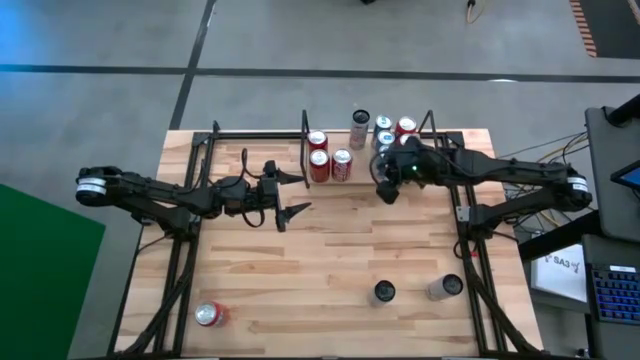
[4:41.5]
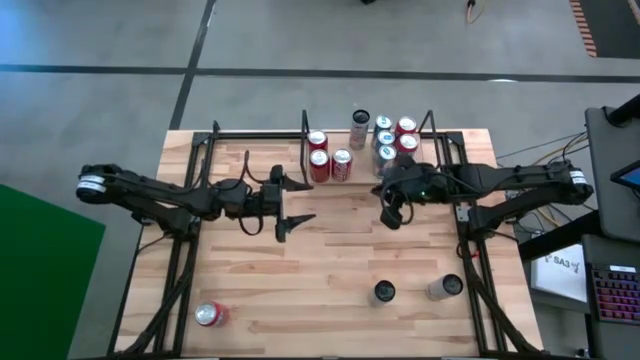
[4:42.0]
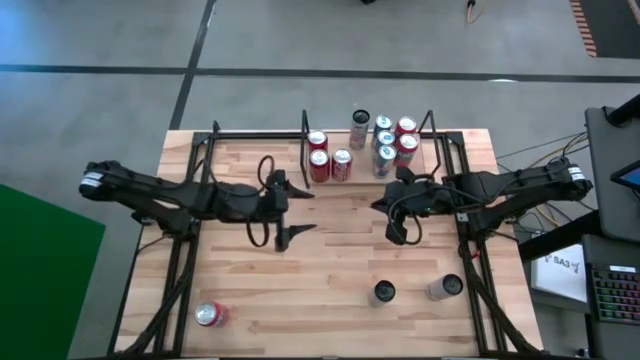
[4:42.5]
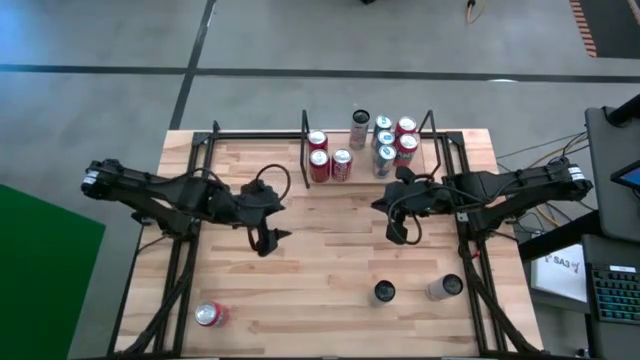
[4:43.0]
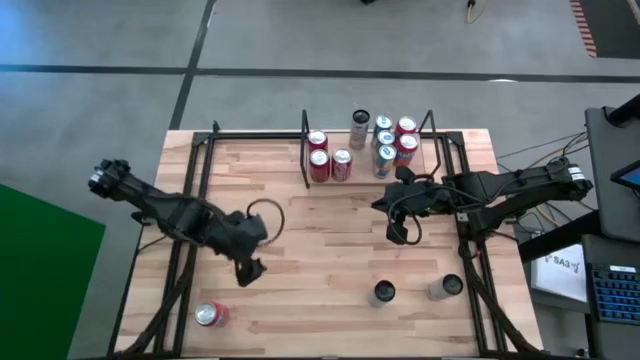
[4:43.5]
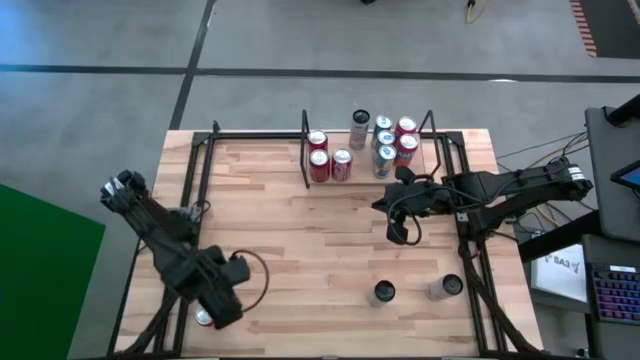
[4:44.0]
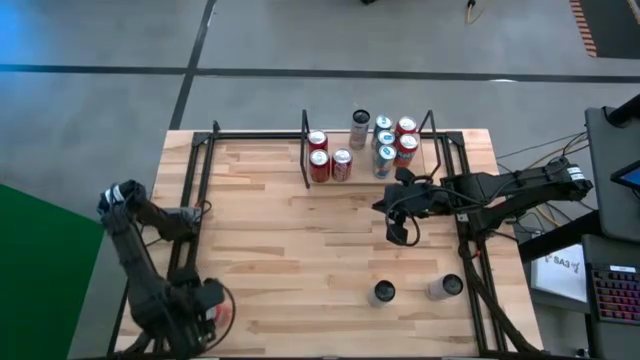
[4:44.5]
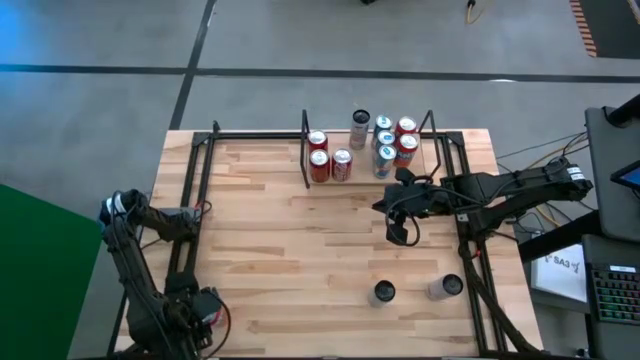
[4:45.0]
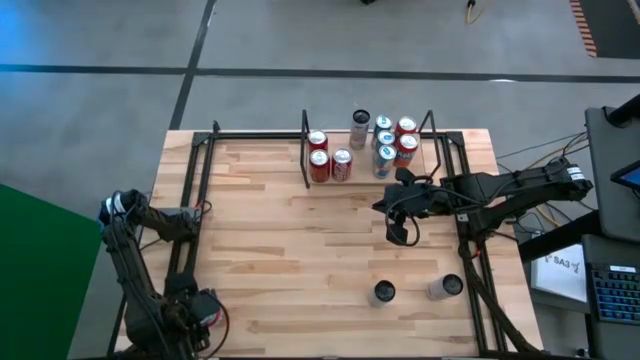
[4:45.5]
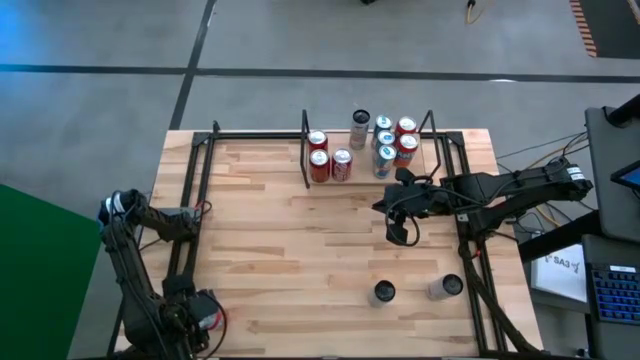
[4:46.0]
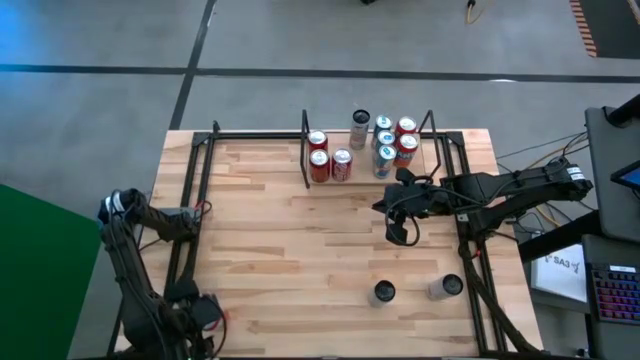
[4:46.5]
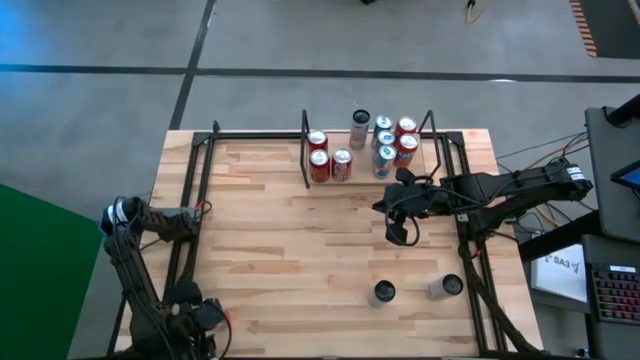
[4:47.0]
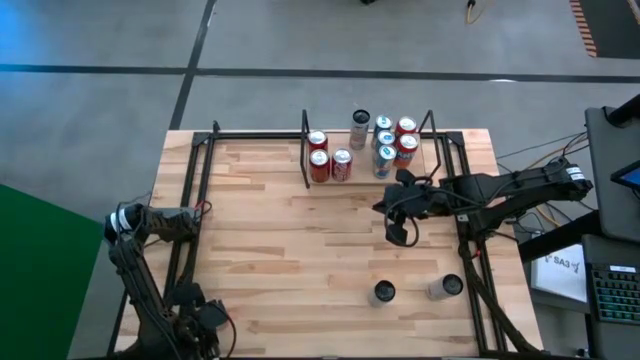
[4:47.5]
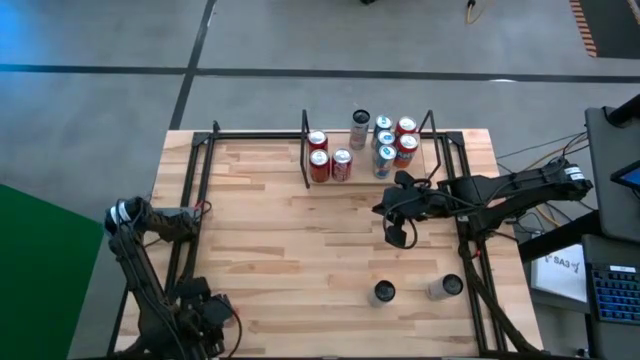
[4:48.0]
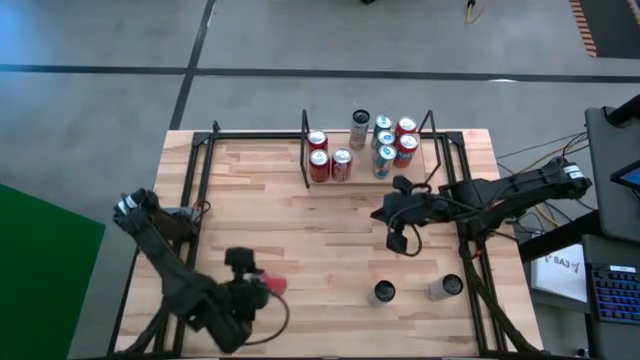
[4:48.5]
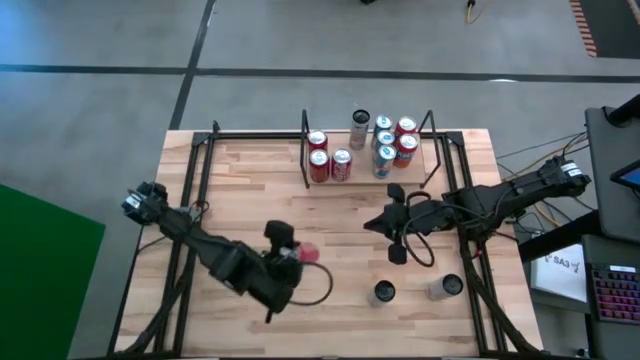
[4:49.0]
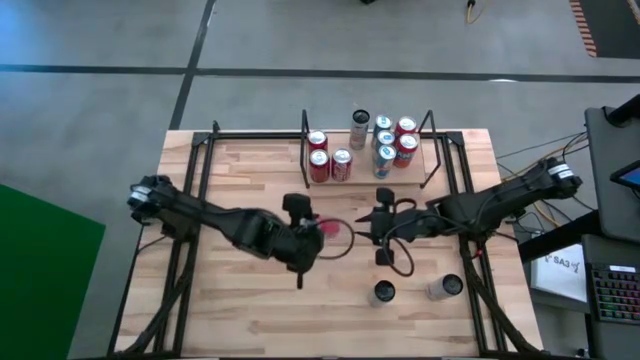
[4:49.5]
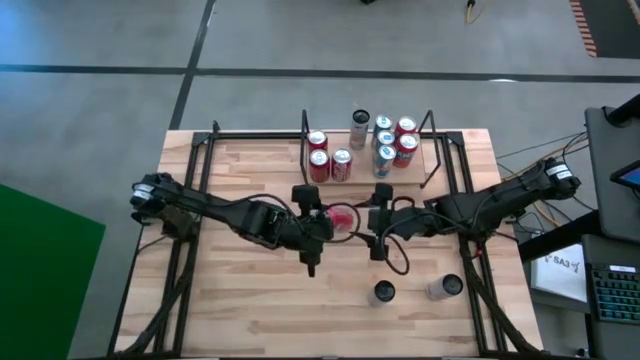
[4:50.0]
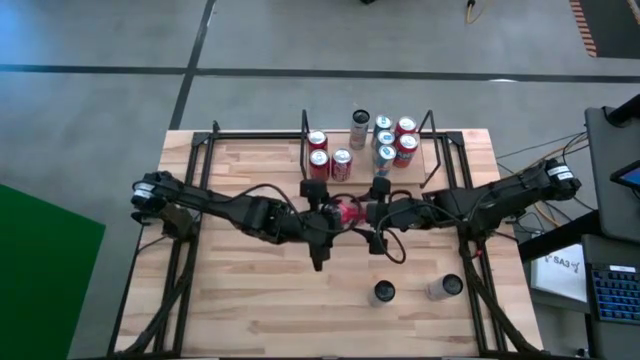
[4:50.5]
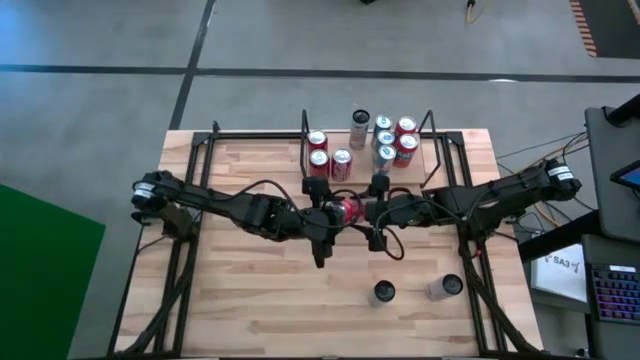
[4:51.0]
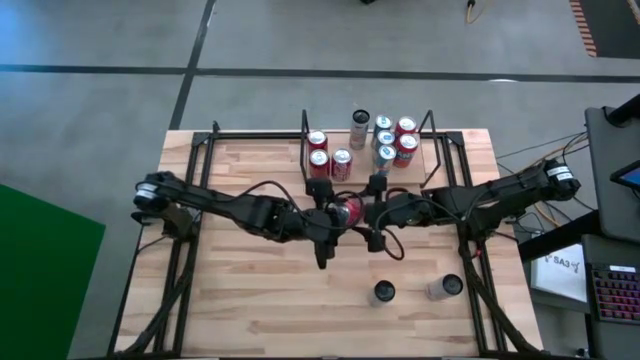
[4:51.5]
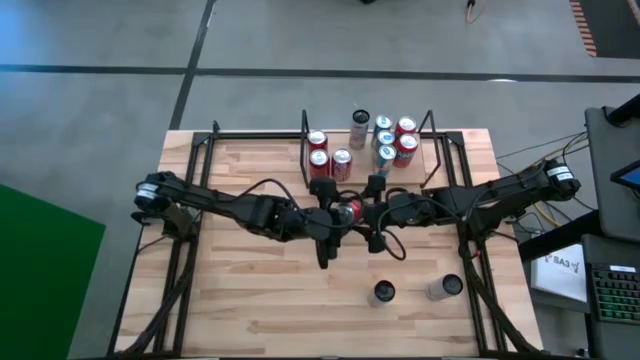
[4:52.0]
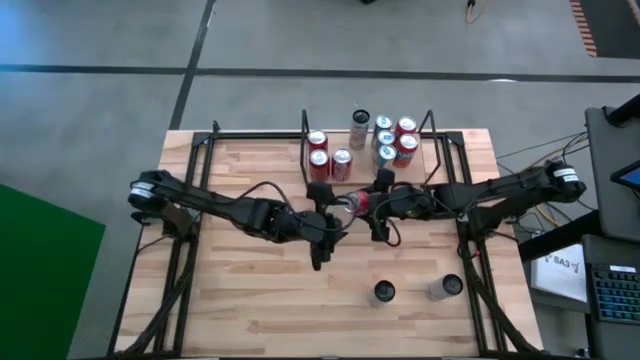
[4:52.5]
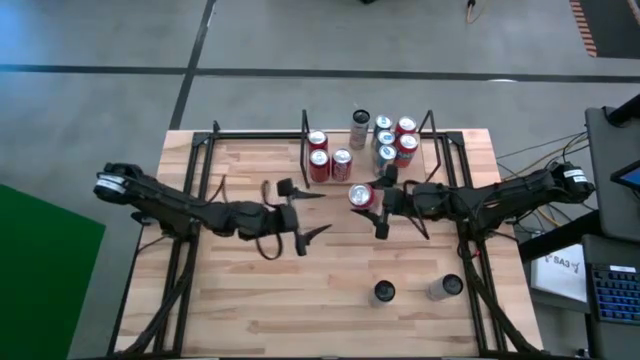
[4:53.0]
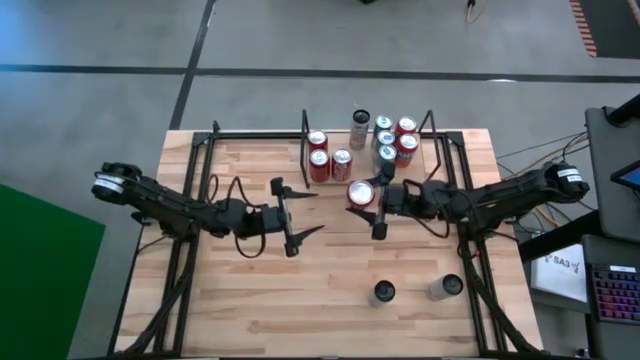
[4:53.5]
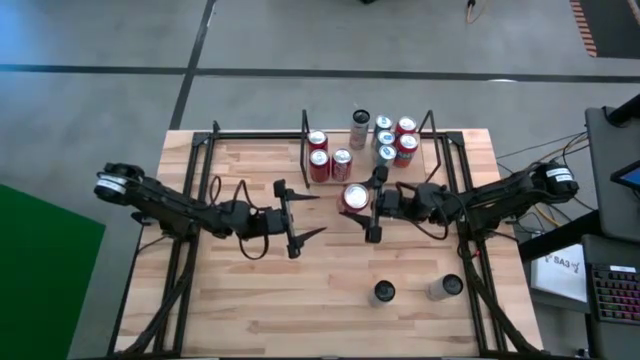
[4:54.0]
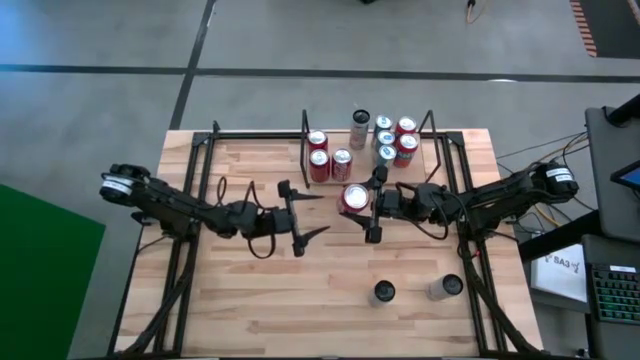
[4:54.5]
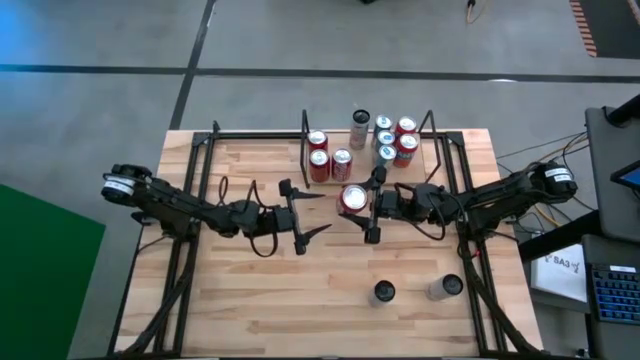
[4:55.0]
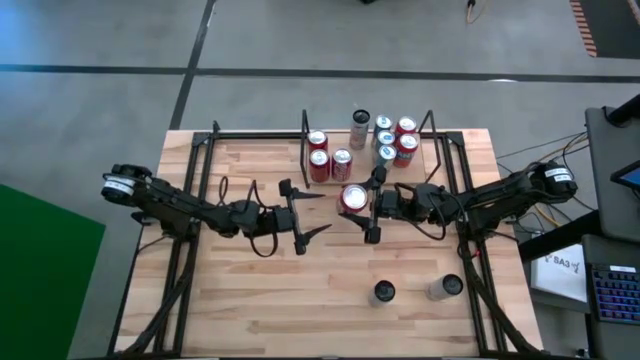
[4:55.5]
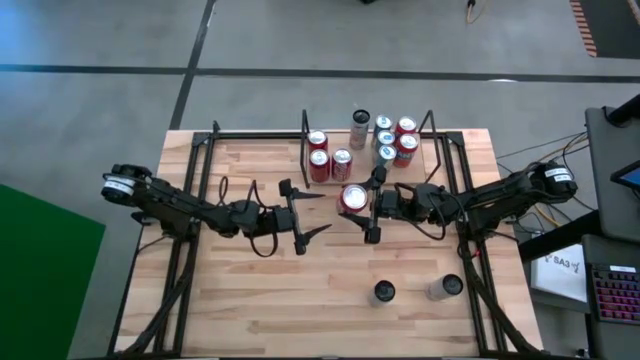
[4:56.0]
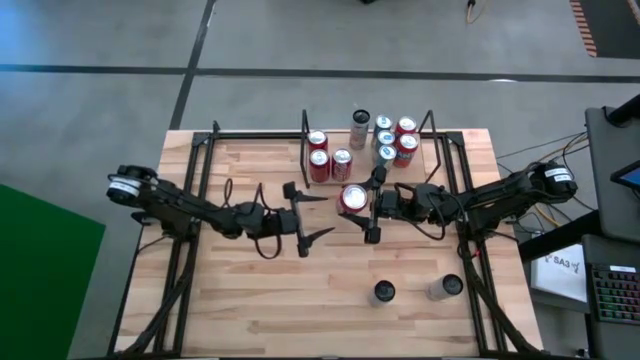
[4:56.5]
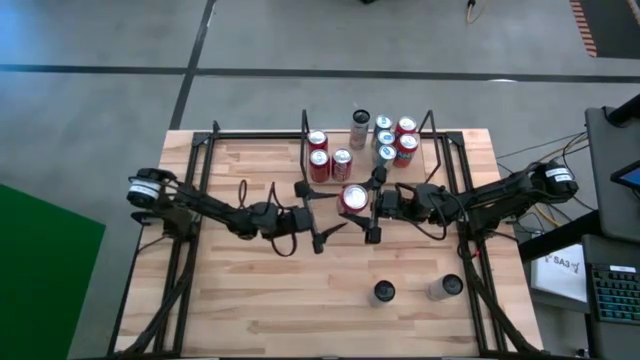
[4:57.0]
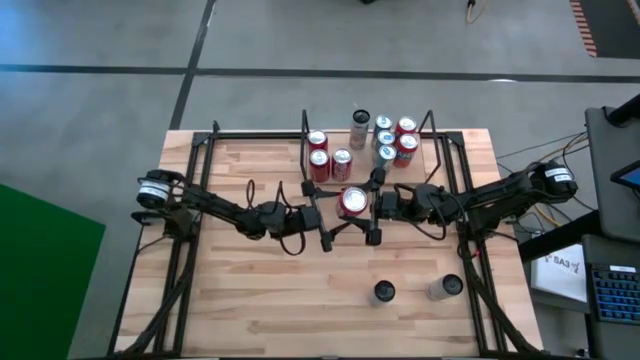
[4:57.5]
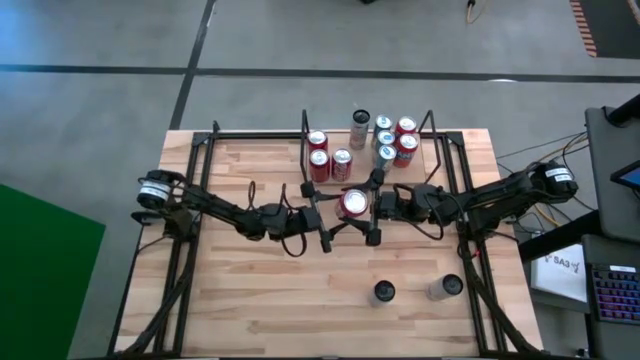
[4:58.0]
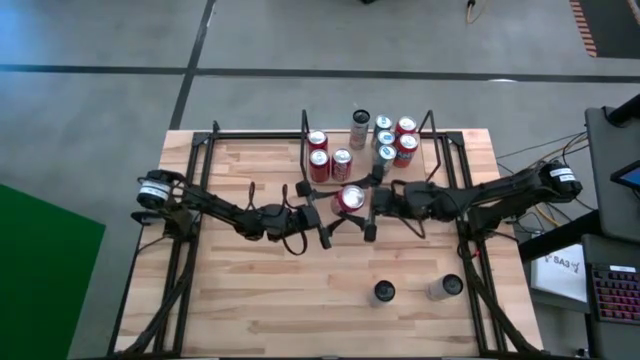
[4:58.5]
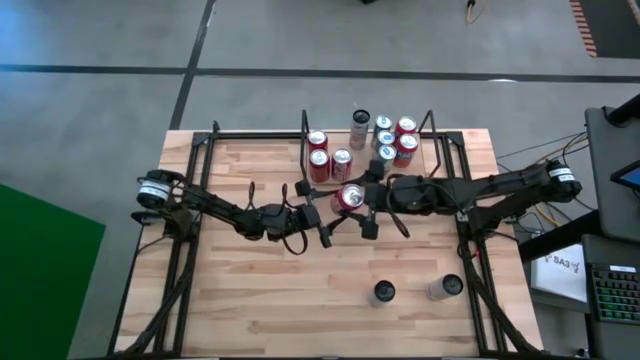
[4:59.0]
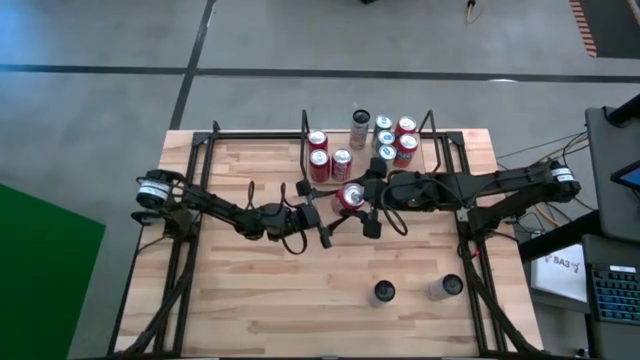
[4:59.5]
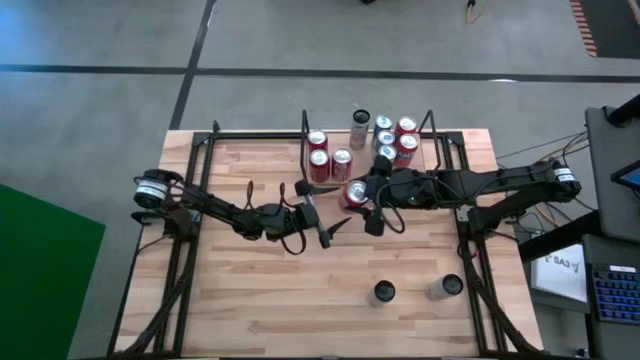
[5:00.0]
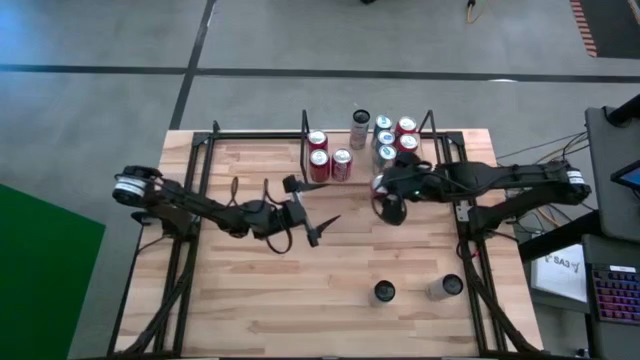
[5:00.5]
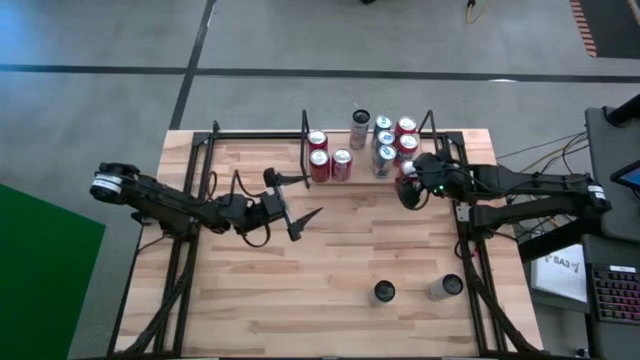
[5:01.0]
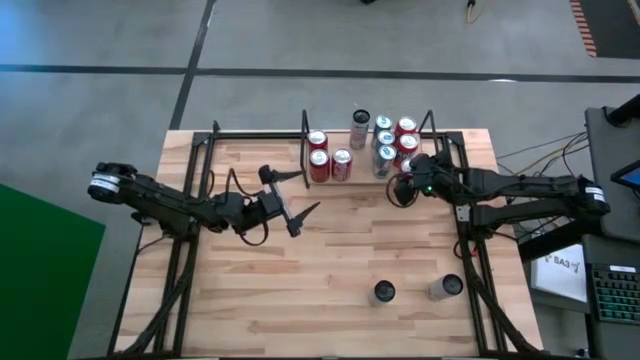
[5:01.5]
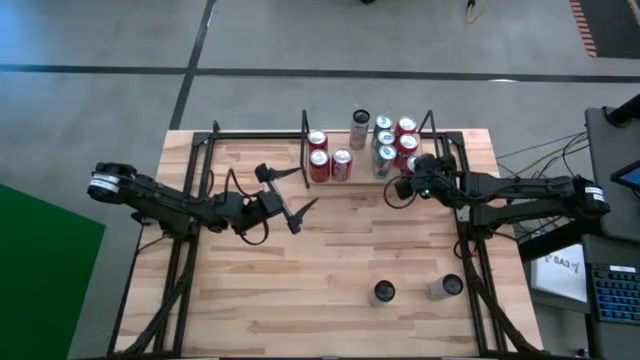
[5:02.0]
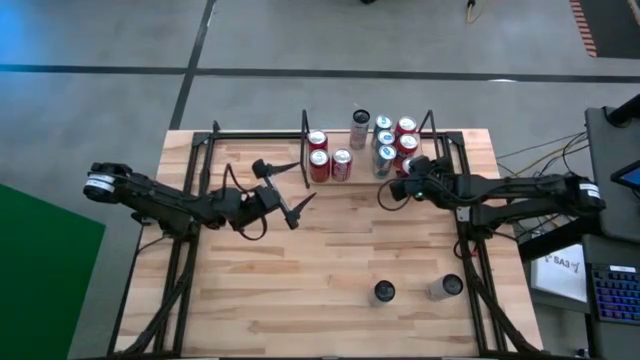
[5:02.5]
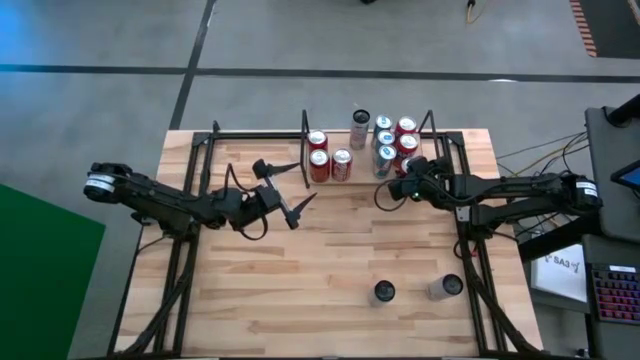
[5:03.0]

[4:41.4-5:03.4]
Task: Place canned beverage on shelf
Put the red soda can on the shelf
